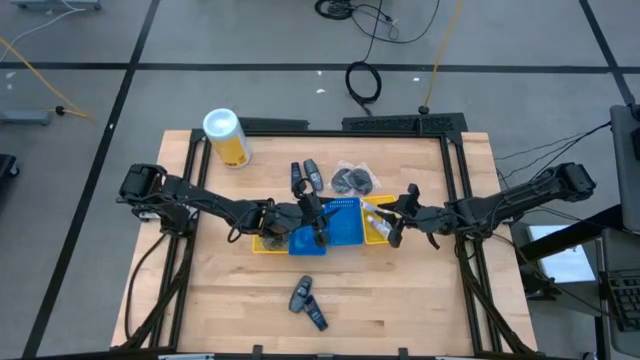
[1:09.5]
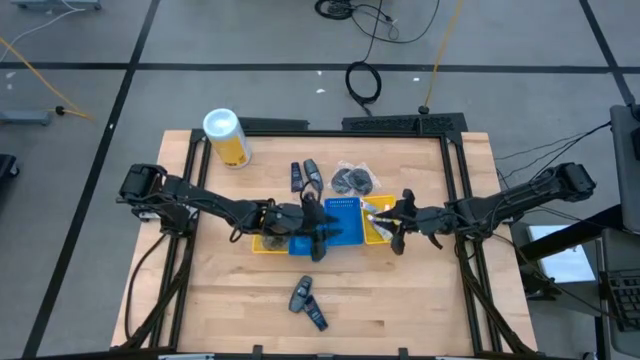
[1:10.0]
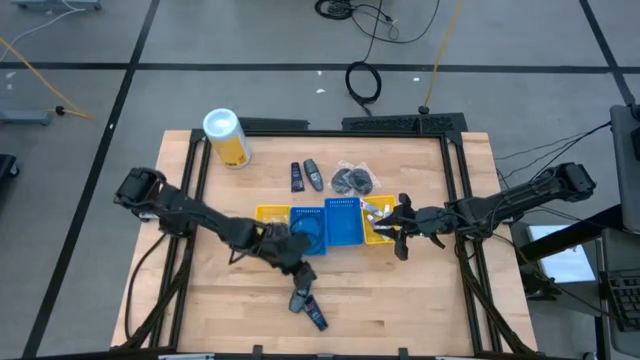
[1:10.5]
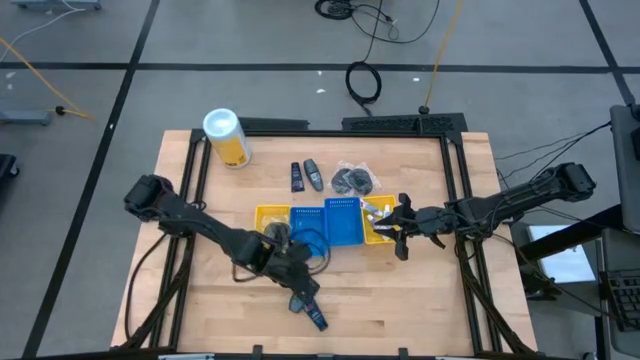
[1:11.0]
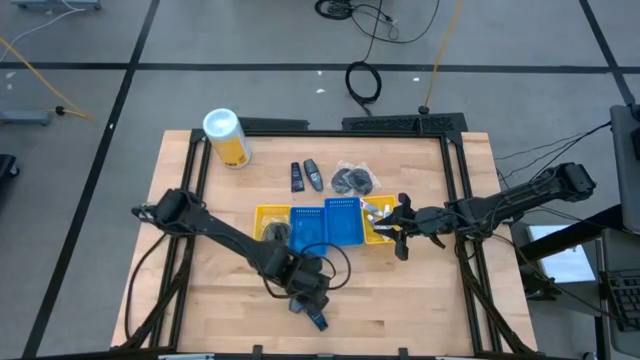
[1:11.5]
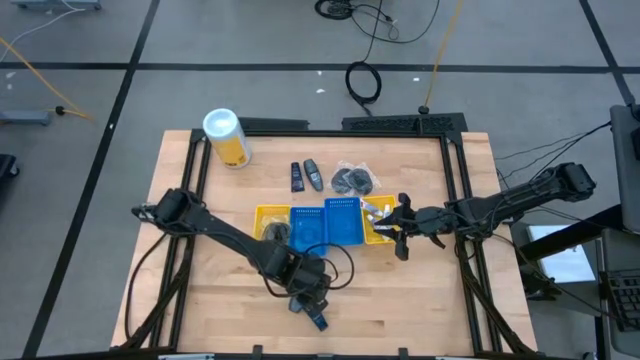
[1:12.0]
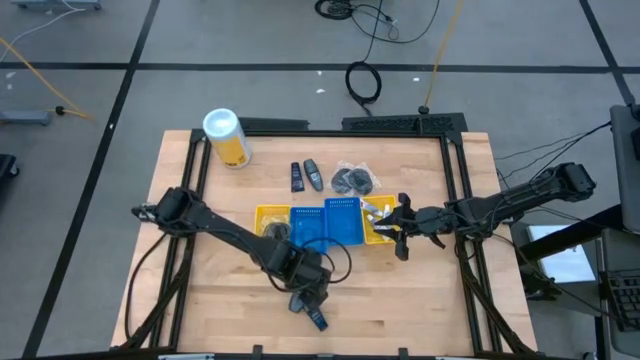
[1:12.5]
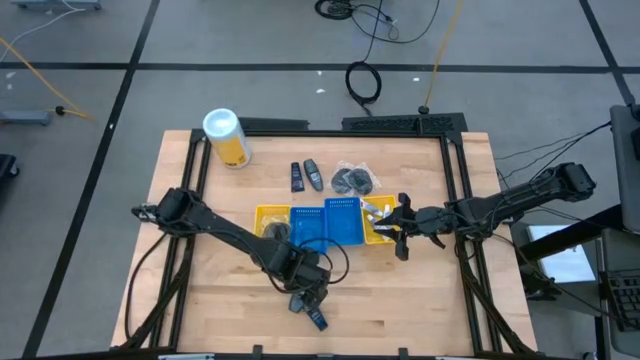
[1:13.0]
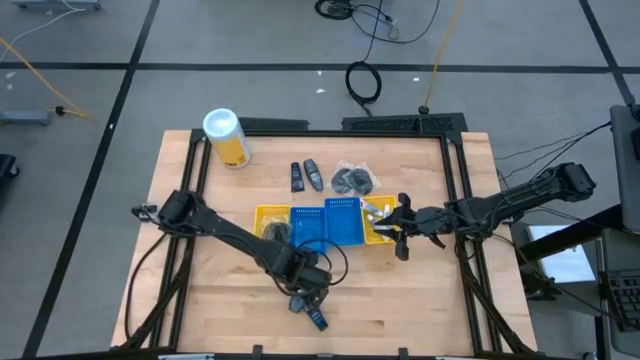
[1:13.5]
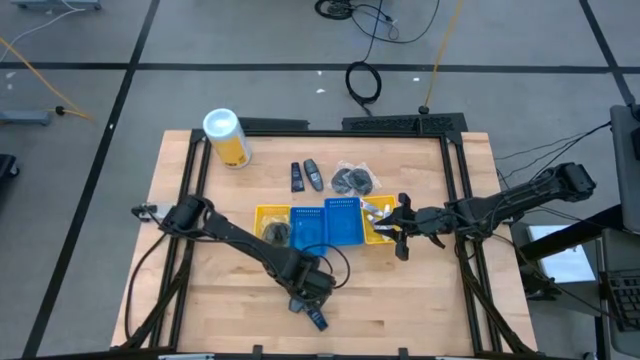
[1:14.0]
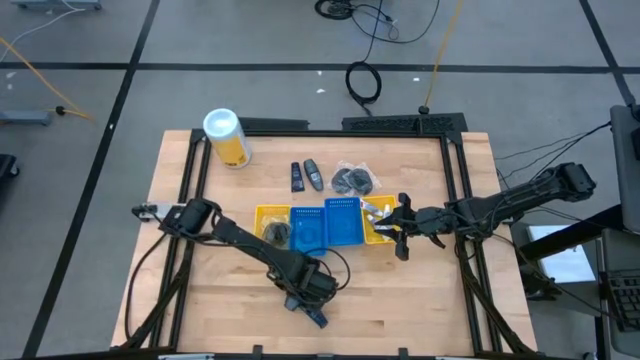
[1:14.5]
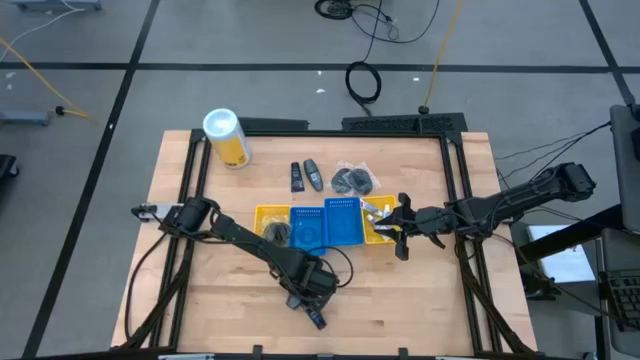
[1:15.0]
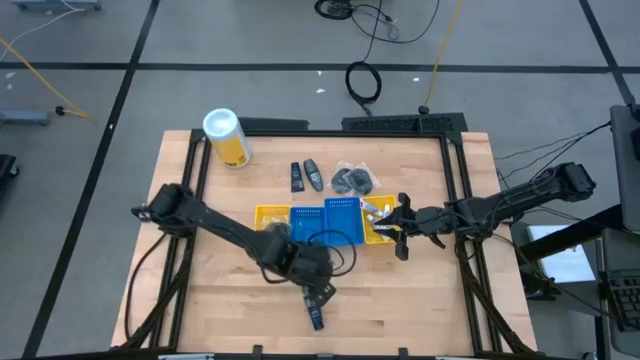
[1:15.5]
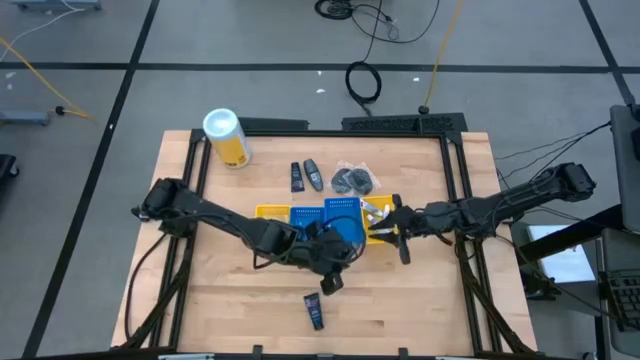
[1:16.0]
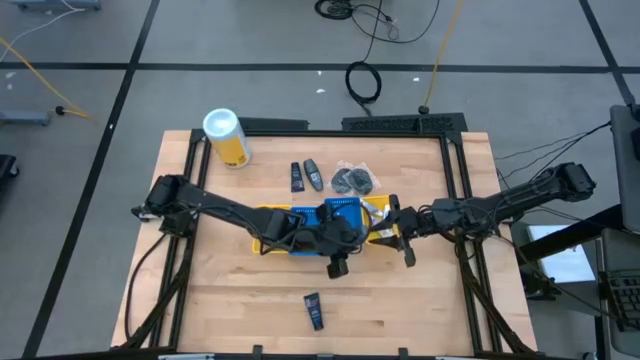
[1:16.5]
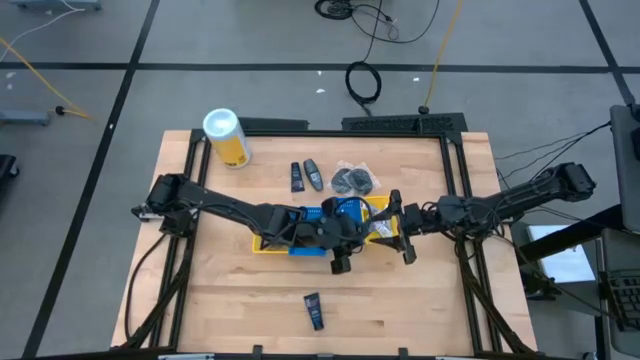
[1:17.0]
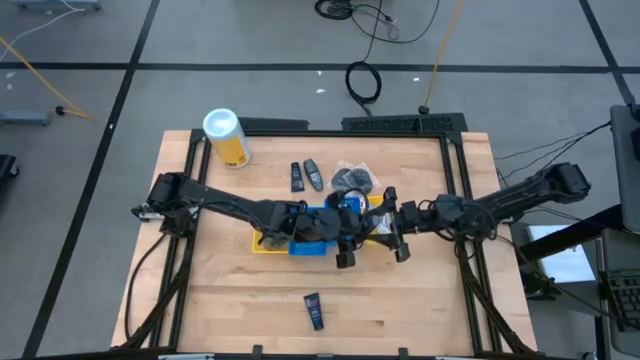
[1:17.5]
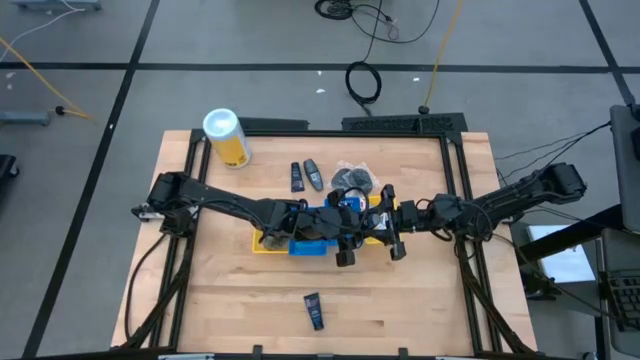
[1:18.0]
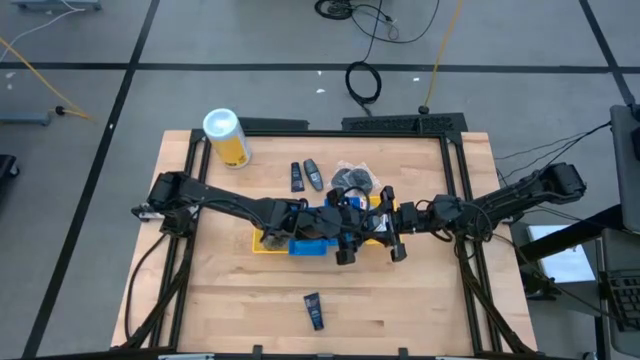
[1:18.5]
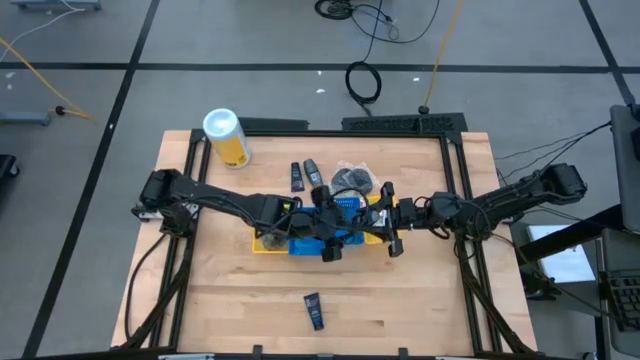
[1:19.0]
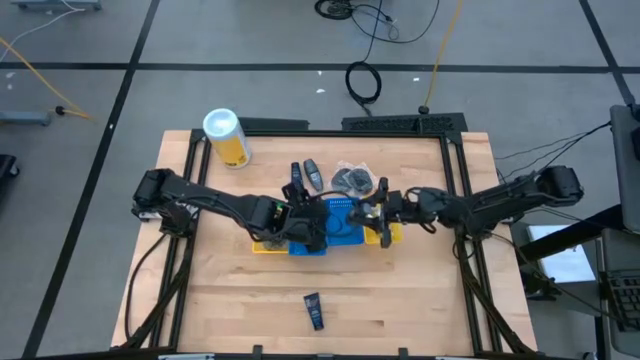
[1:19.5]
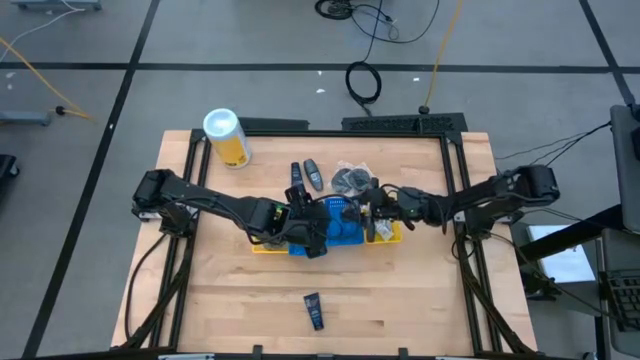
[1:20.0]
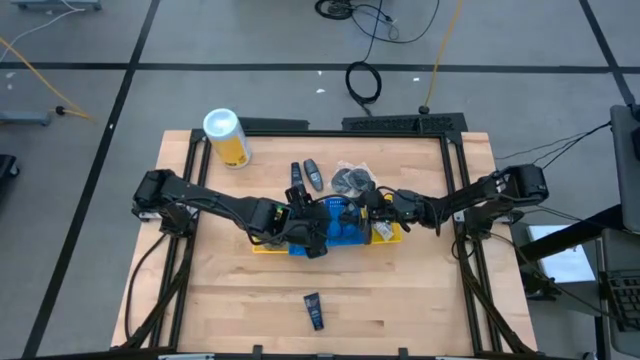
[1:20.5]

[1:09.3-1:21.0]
Task: Pick & Place Travel size toiletries
Put the deodorant into the right blue bin

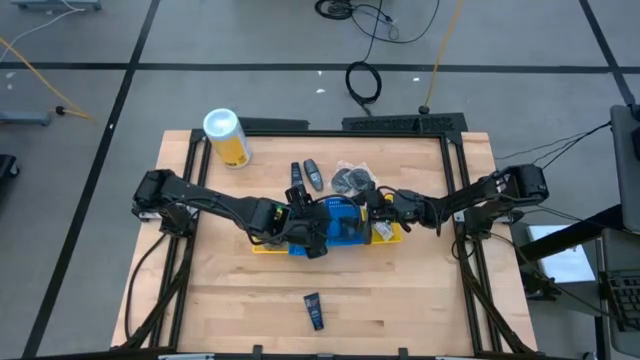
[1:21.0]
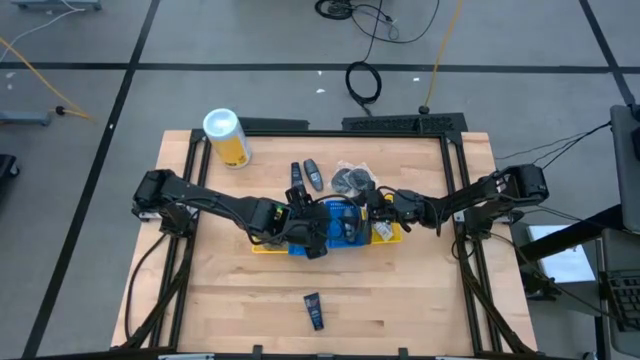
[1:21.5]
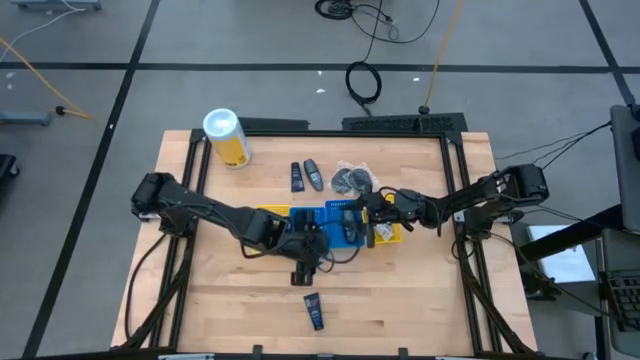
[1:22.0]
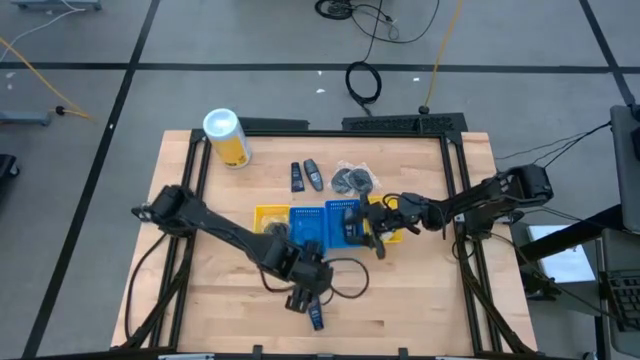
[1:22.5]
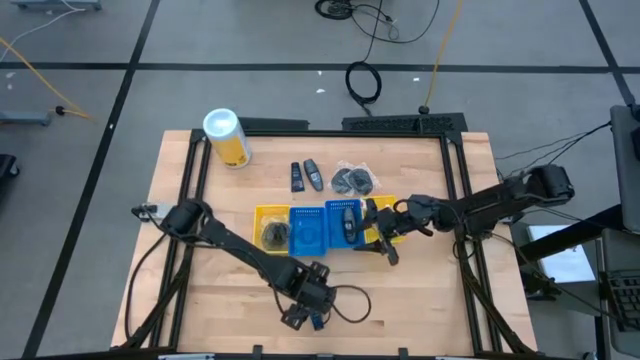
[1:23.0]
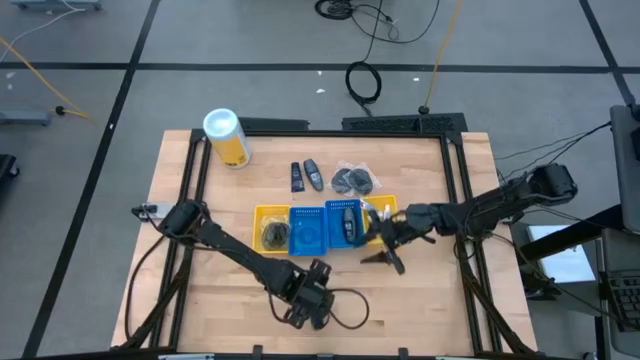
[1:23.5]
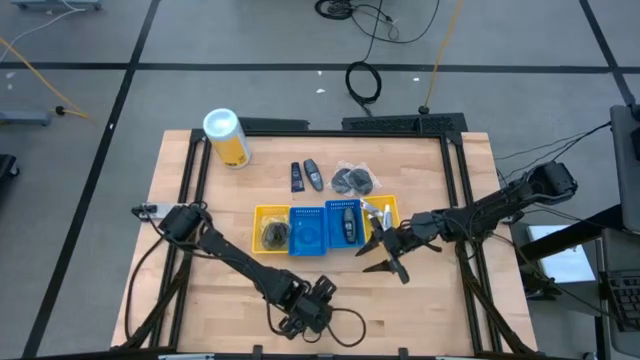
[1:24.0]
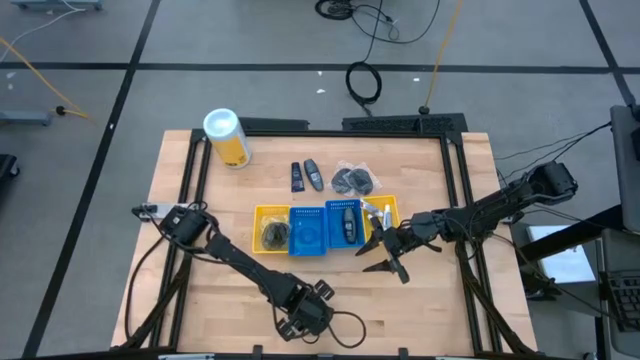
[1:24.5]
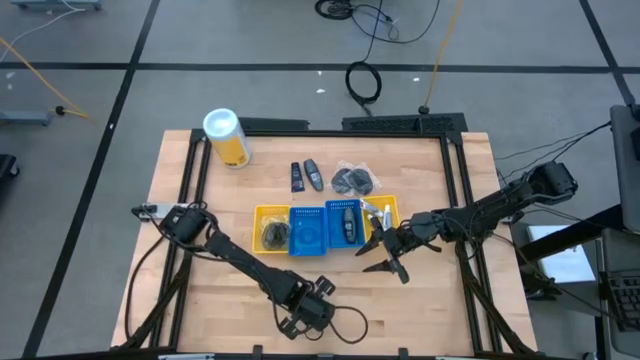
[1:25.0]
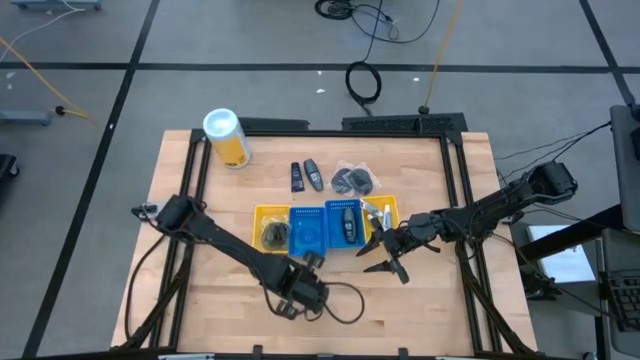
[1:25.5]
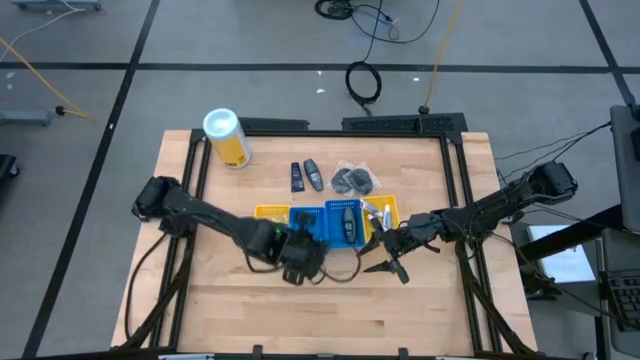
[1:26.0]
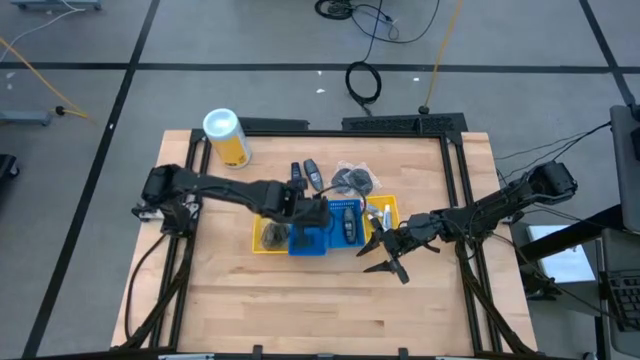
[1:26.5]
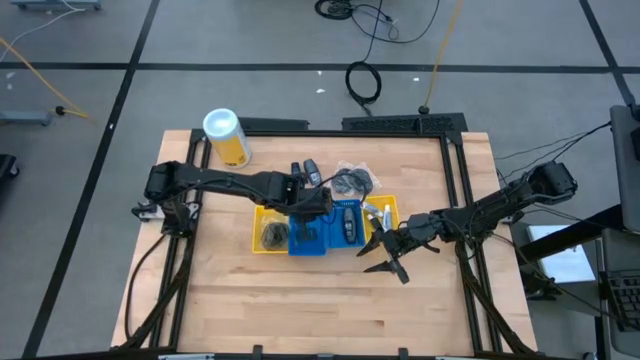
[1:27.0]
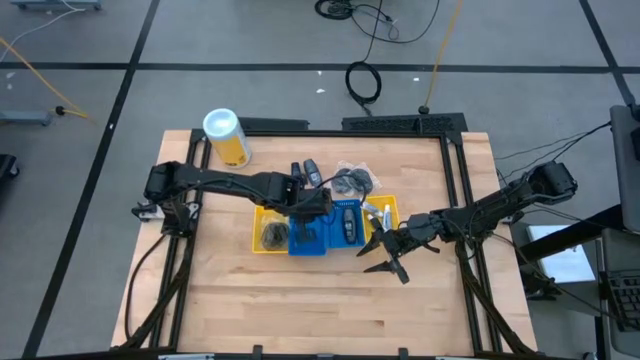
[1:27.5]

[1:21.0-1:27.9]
Put the shave cream into the left blue bin

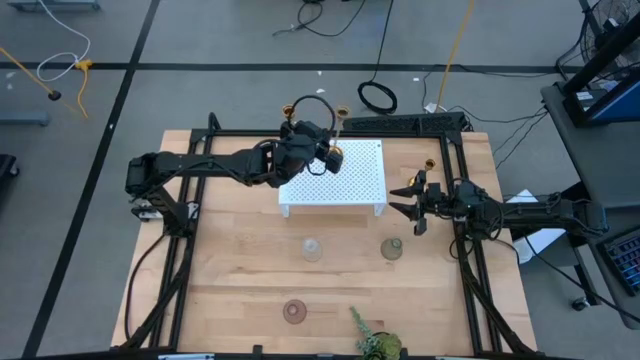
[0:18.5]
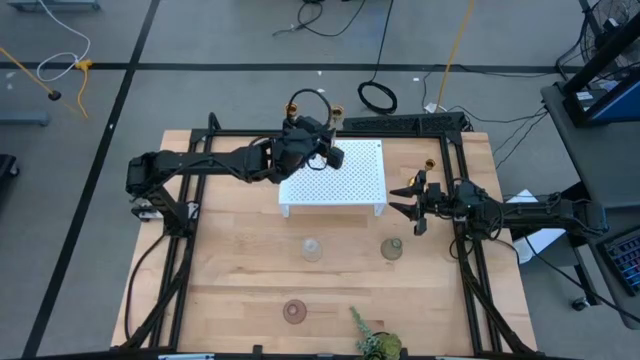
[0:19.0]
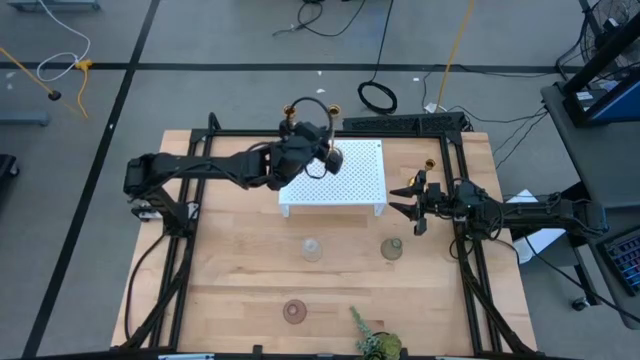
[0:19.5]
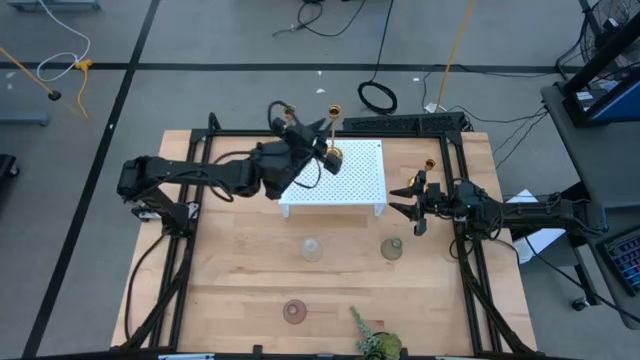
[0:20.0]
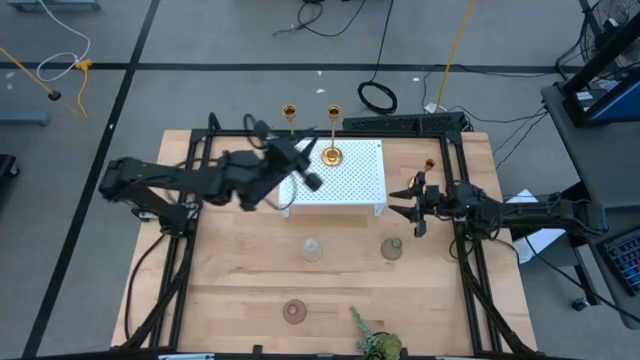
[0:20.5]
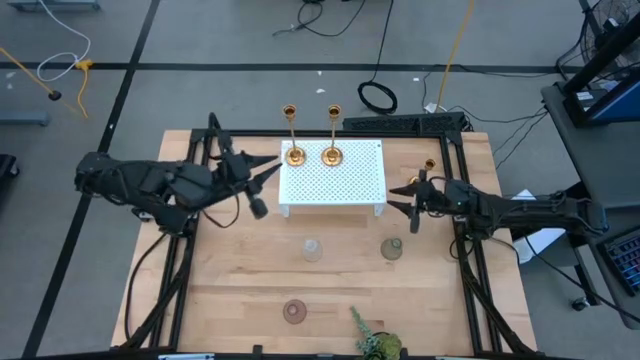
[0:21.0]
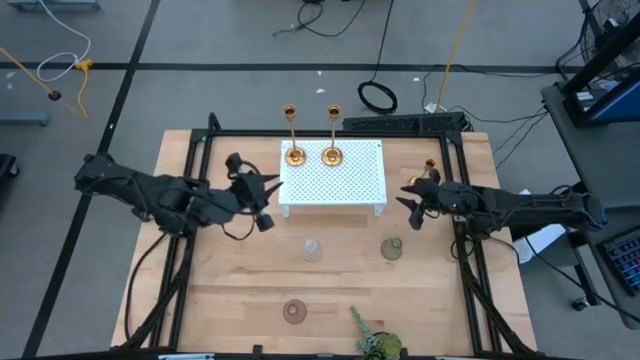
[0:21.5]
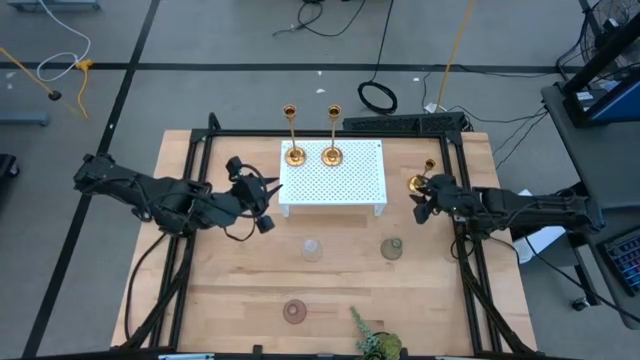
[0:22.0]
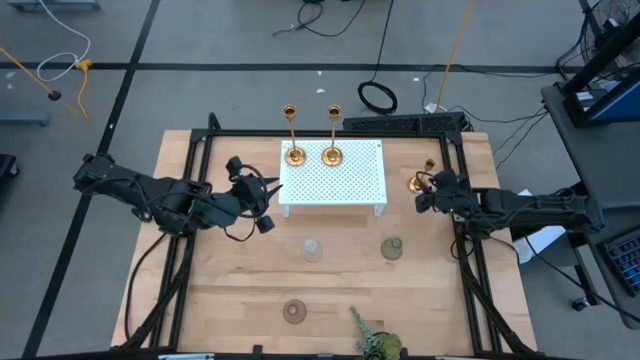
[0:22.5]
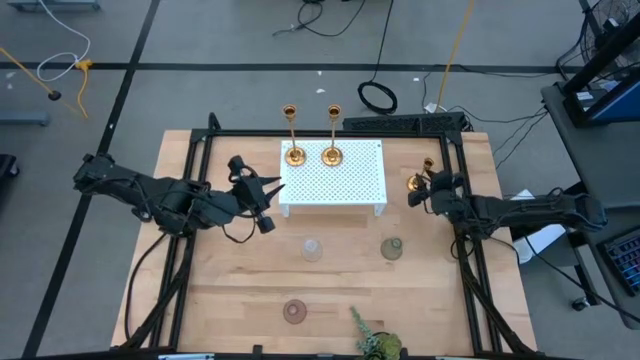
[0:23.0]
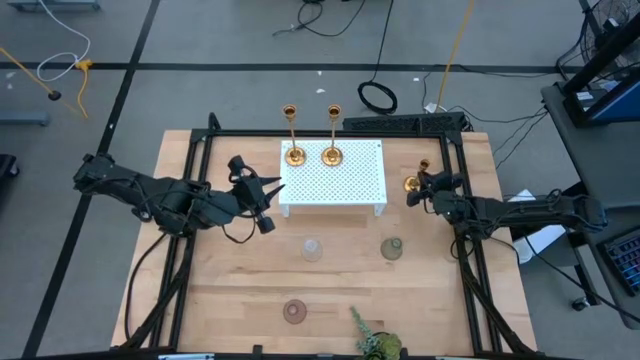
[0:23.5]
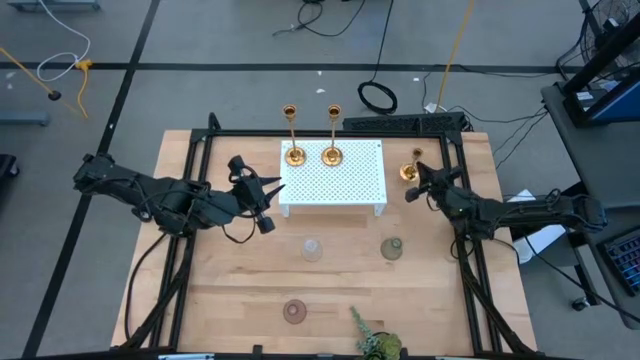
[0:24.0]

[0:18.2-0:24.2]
Task: Pick & Place candle stick holders
Put the gold metal candle holder on the shelf
